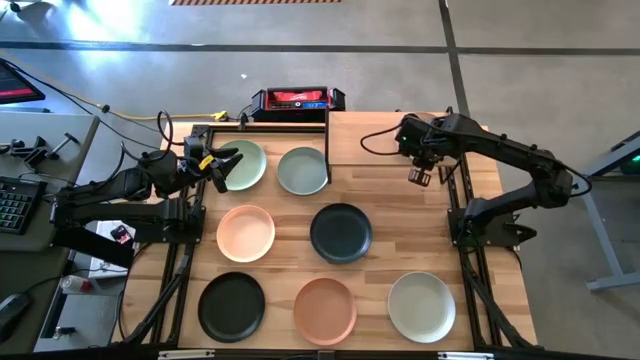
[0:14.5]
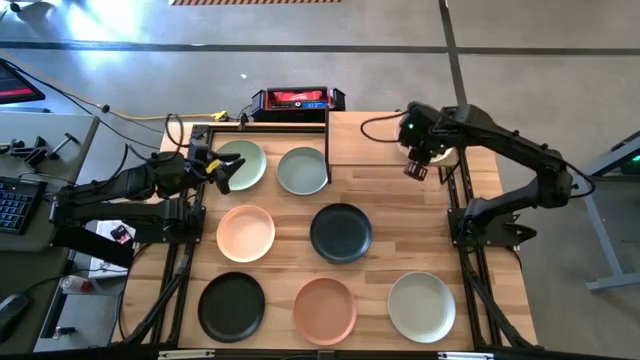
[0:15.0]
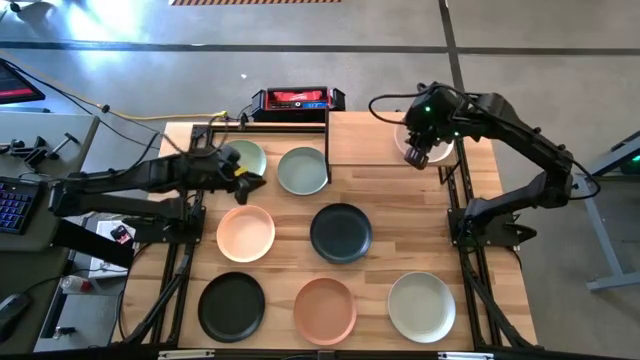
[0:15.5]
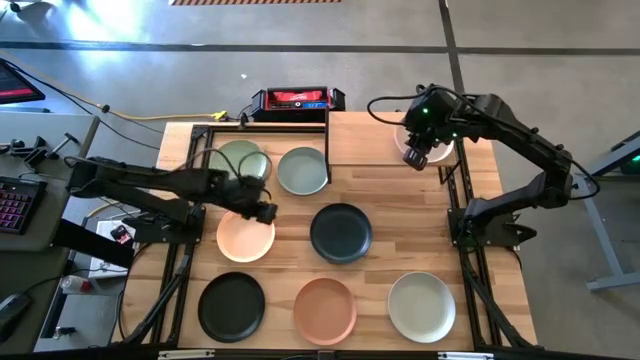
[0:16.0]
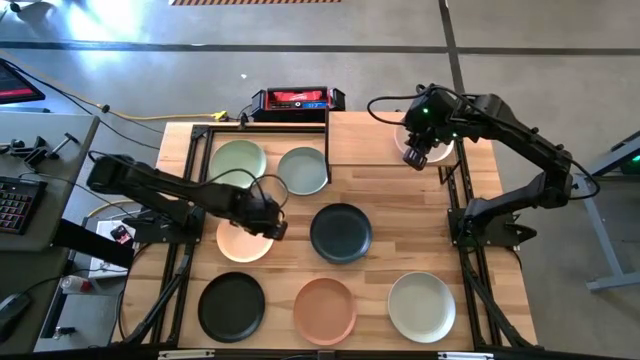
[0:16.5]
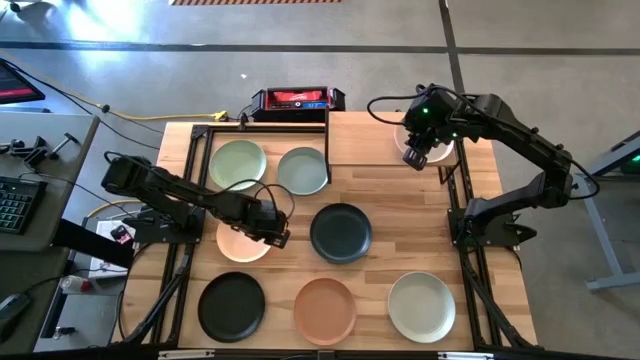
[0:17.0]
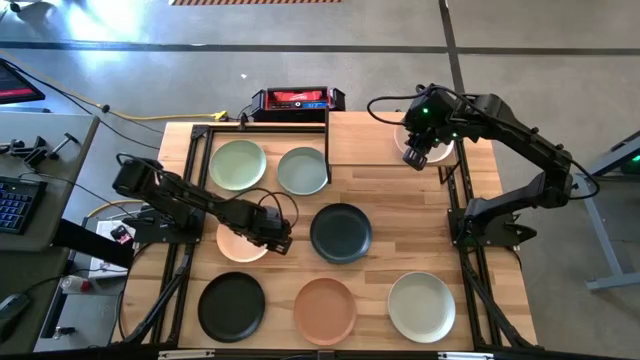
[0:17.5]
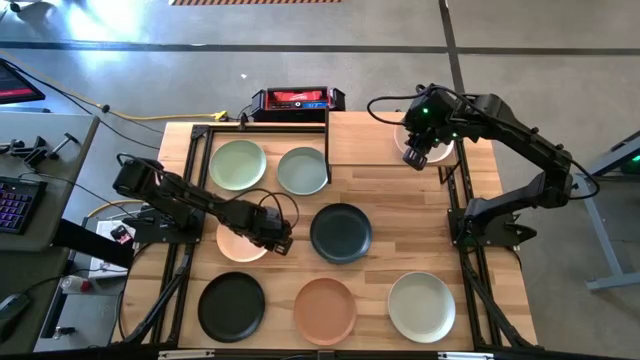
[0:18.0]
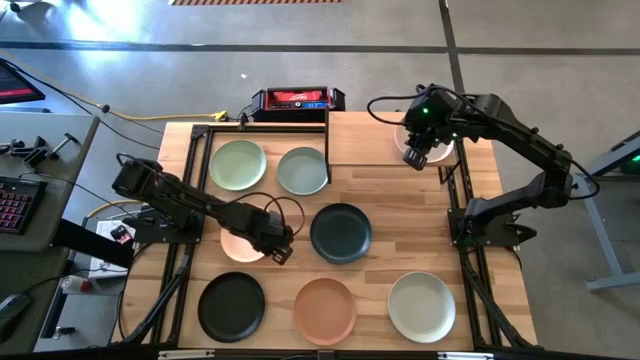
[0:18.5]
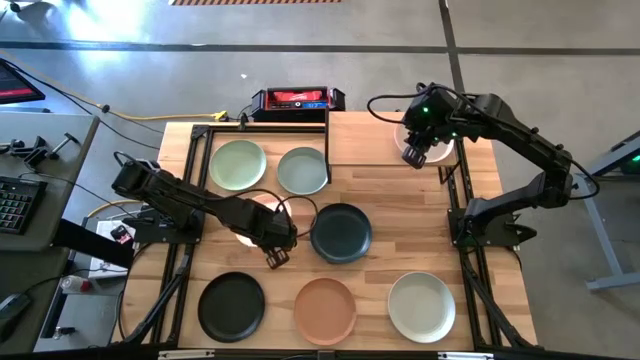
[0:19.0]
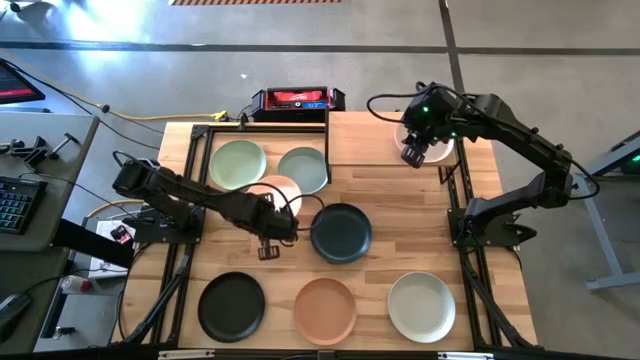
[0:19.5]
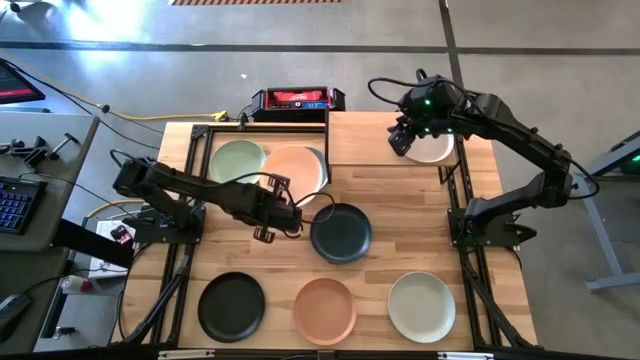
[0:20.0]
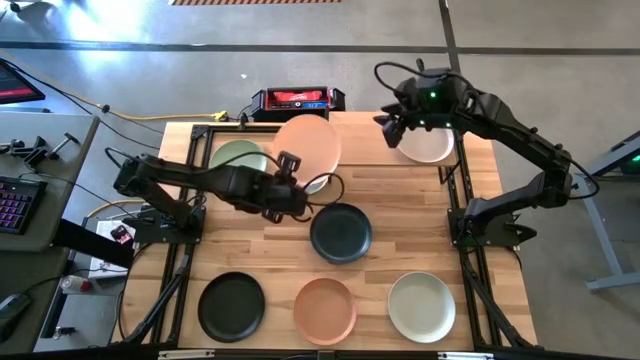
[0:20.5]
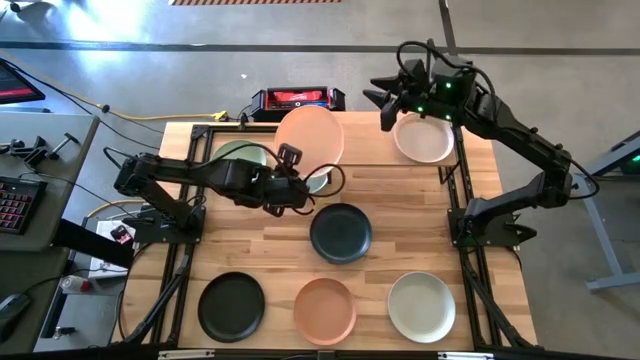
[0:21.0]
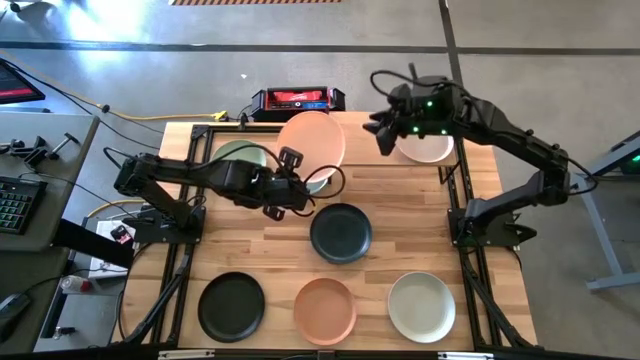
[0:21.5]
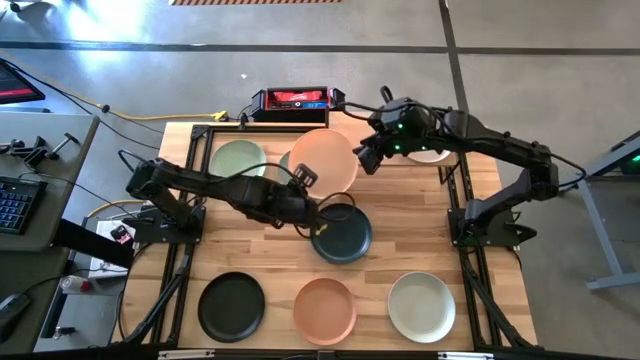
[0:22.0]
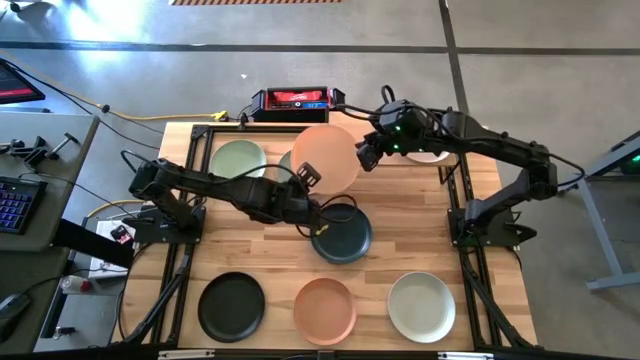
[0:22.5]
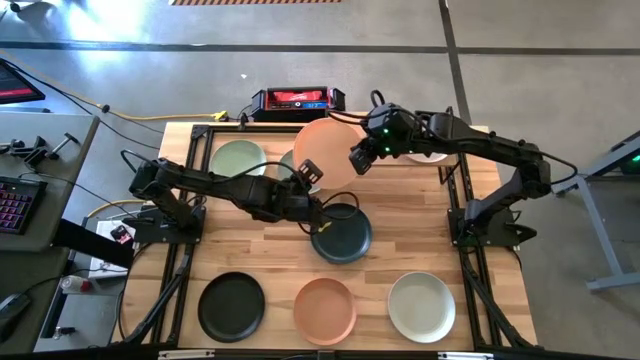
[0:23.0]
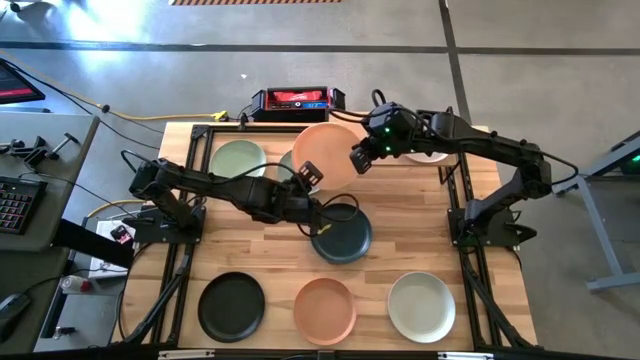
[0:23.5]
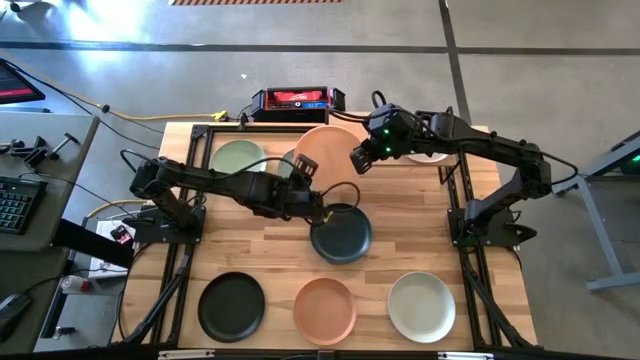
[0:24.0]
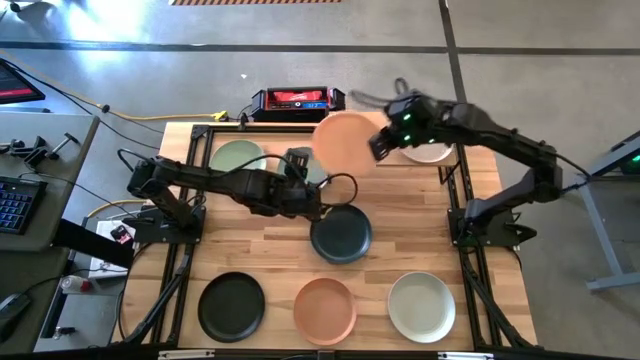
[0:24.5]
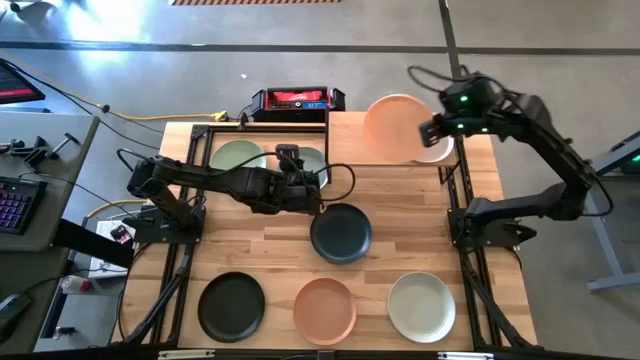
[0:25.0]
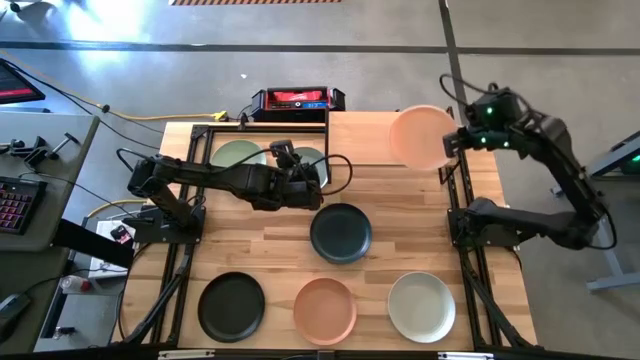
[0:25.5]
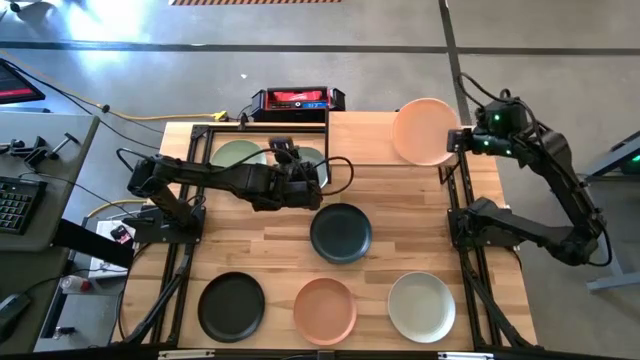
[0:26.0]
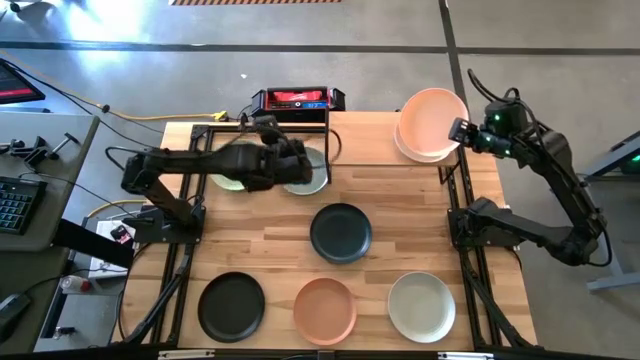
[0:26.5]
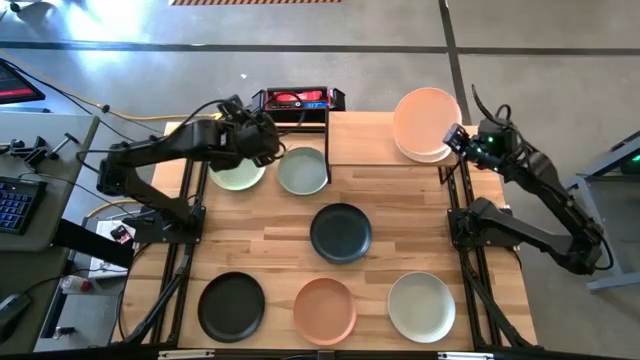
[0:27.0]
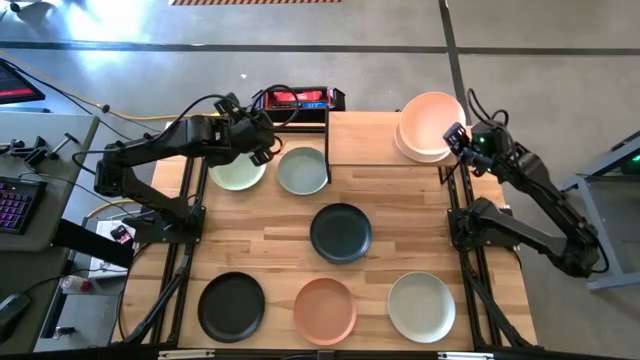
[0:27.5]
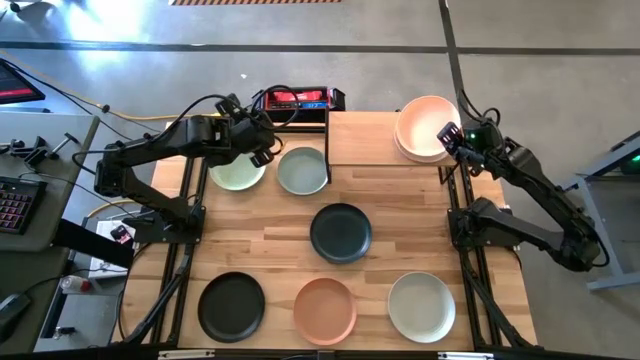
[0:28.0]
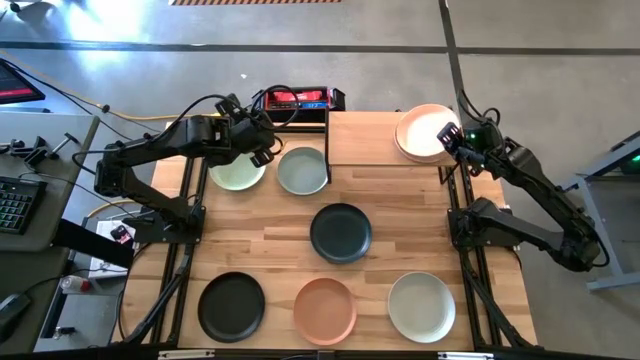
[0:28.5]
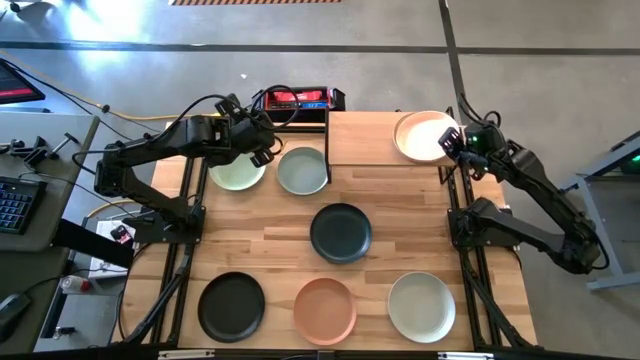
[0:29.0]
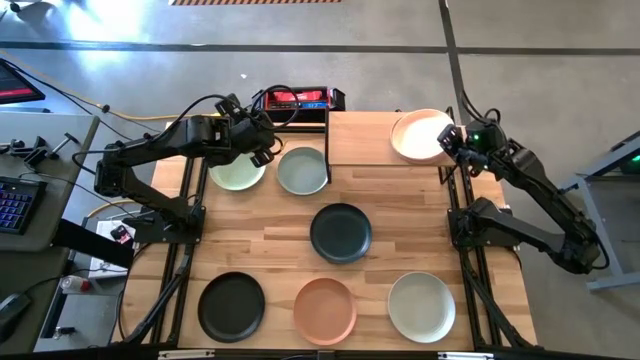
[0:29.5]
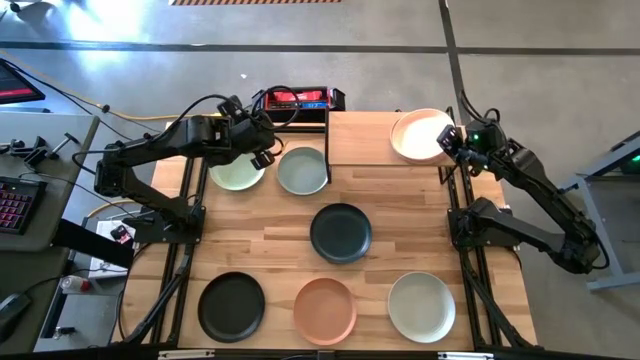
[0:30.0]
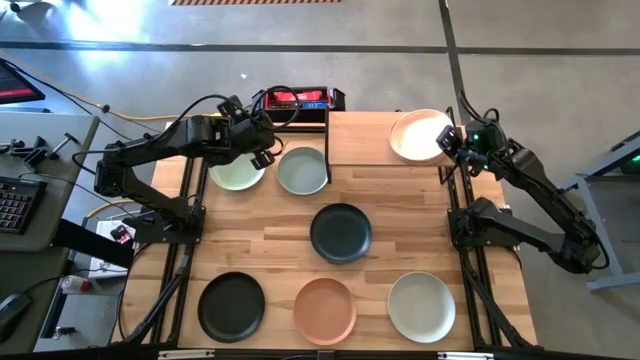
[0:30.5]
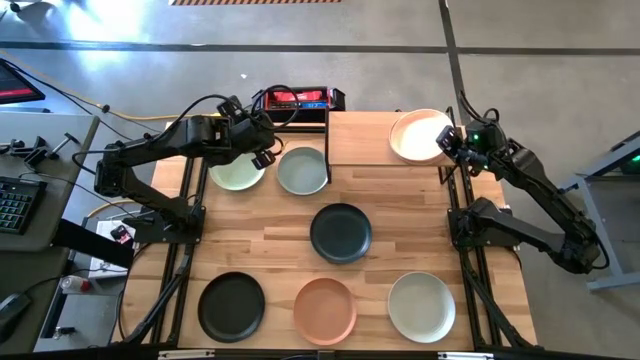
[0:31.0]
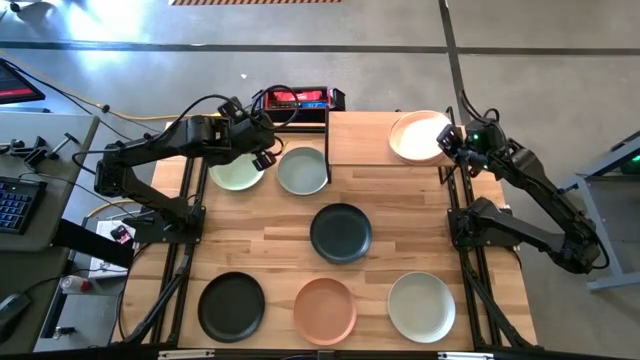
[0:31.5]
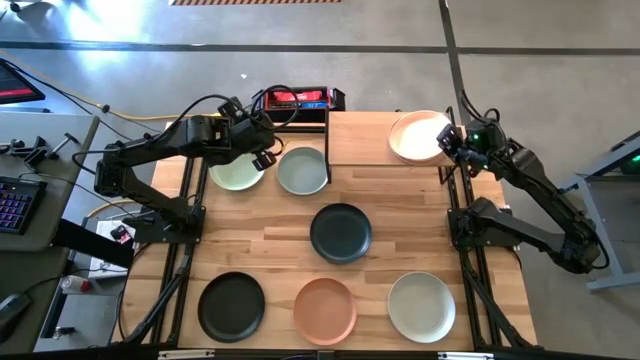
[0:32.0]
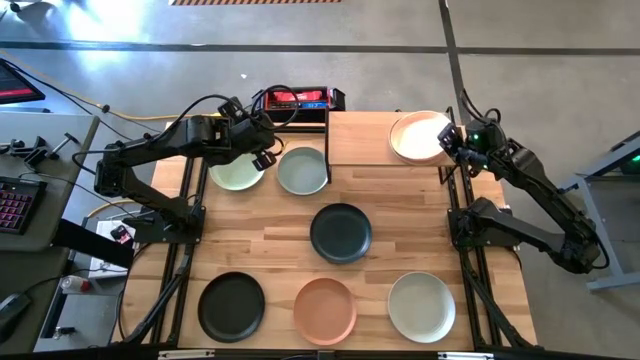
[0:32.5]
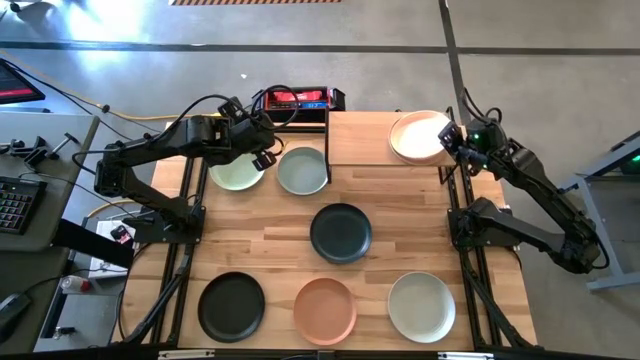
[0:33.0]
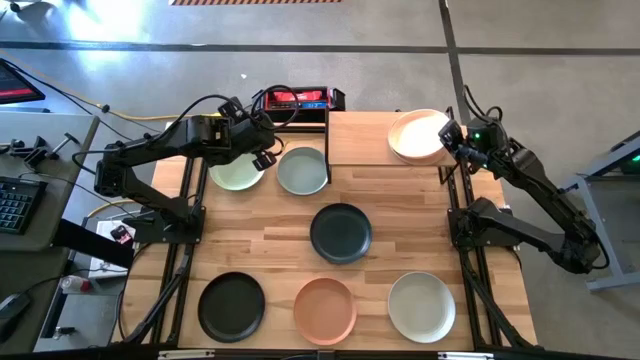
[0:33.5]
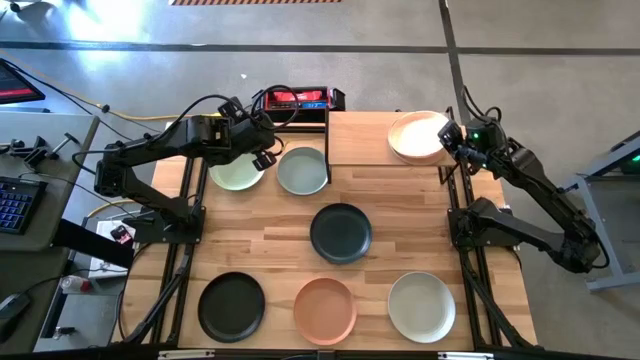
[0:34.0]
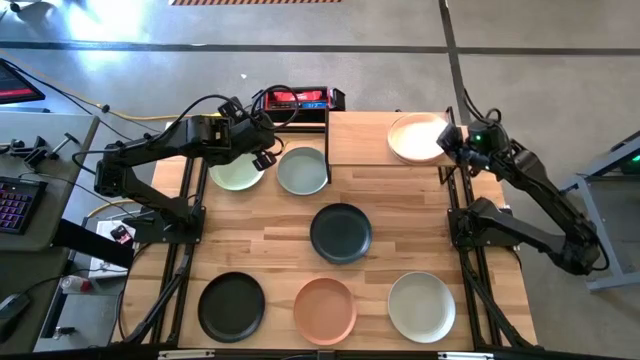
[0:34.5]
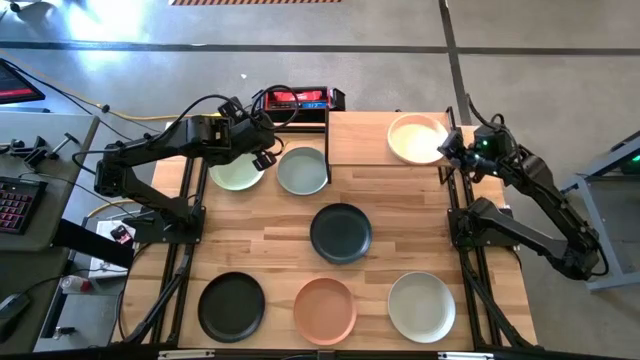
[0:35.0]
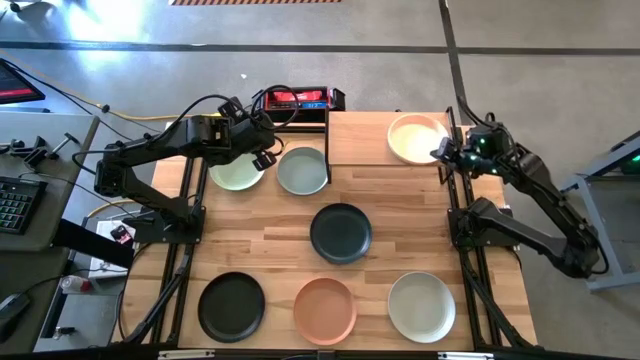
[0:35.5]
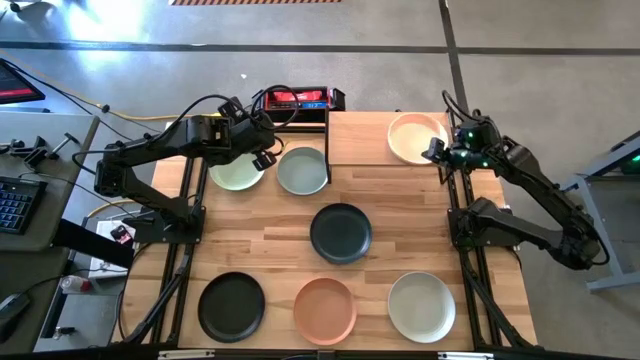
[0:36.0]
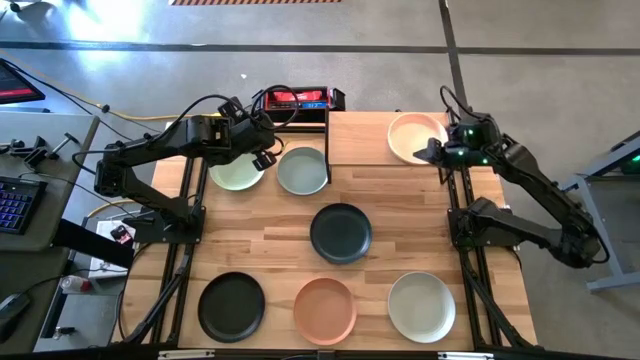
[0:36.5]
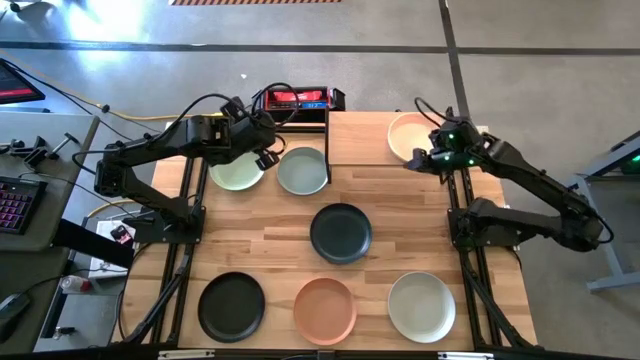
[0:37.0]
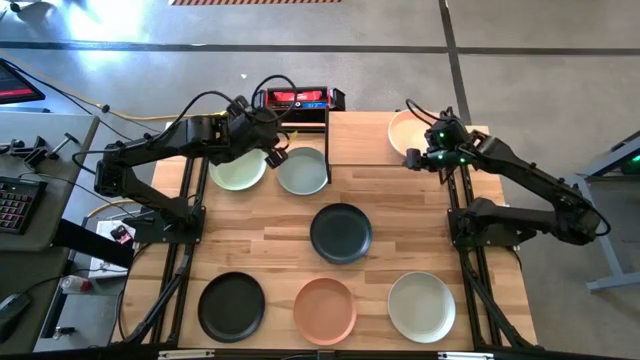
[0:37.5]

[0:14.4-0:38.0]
Task: Place and stack plates onto a shelf
Stack the orange plate on the light brown plate on the shelf
